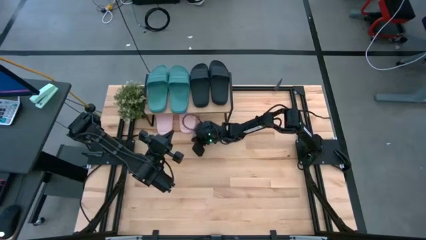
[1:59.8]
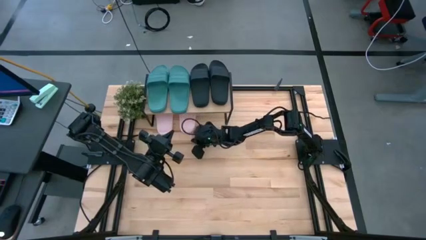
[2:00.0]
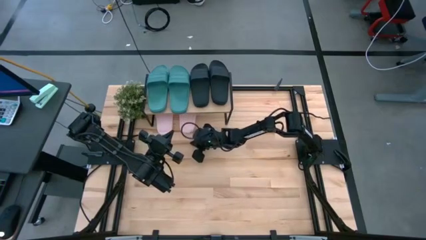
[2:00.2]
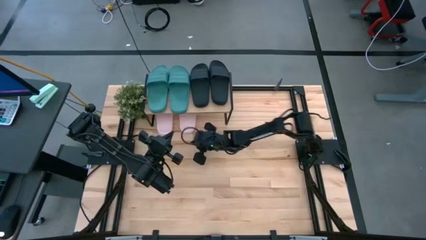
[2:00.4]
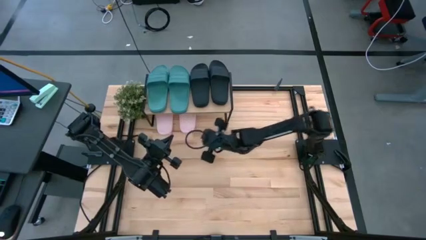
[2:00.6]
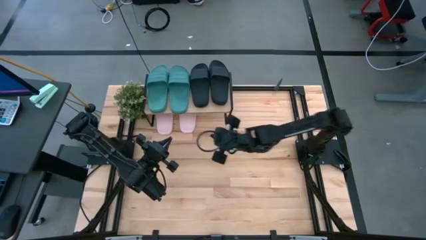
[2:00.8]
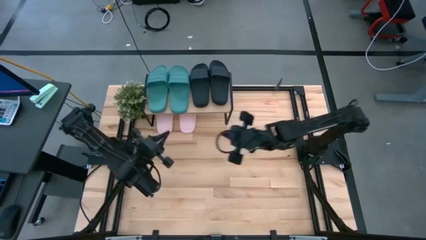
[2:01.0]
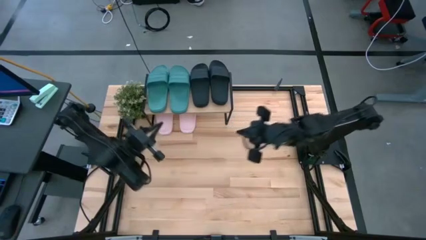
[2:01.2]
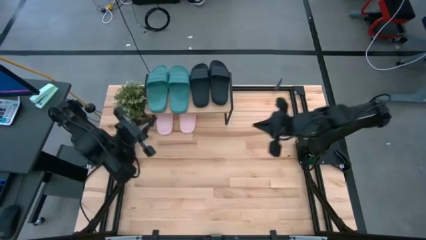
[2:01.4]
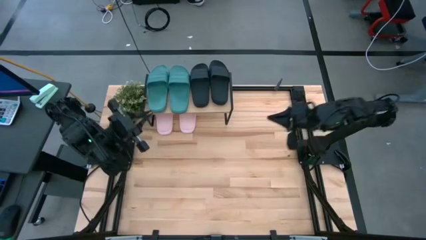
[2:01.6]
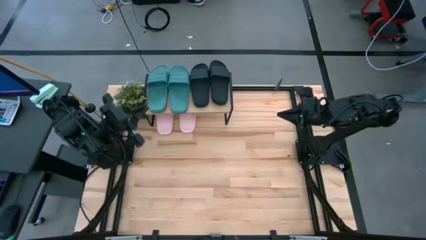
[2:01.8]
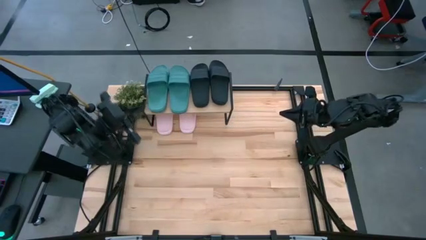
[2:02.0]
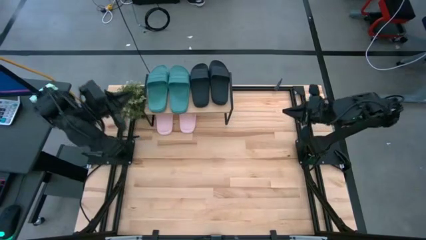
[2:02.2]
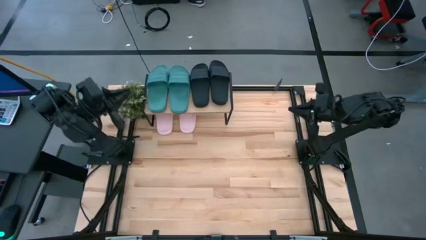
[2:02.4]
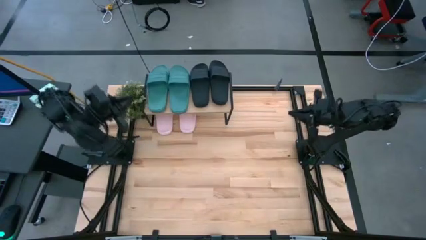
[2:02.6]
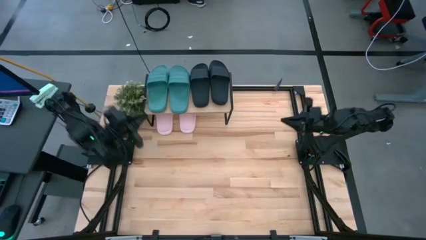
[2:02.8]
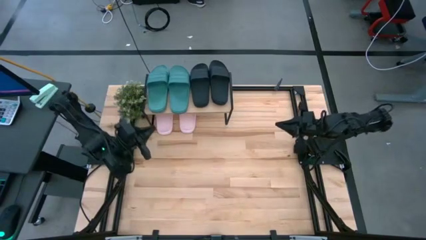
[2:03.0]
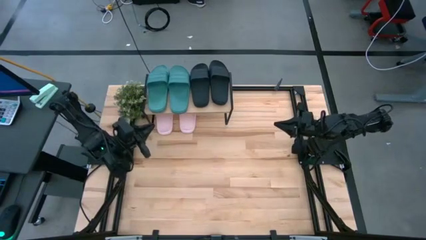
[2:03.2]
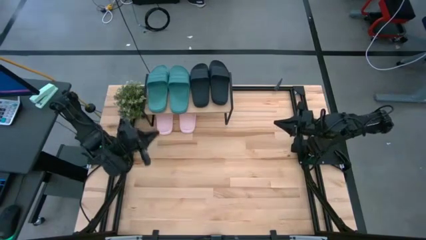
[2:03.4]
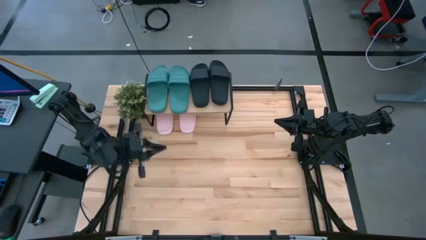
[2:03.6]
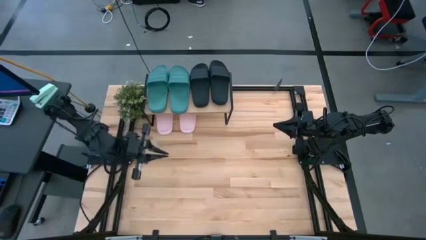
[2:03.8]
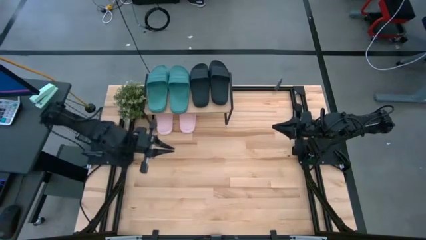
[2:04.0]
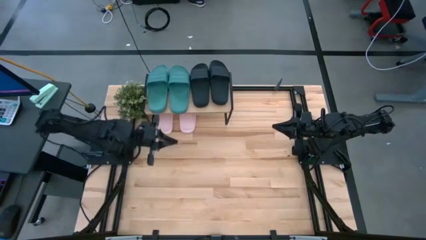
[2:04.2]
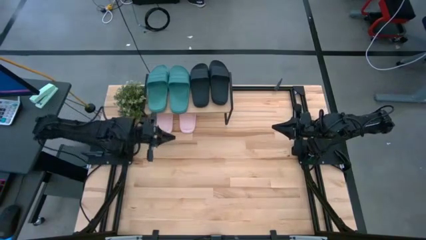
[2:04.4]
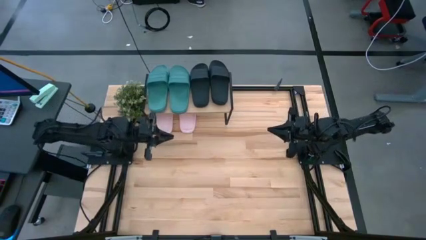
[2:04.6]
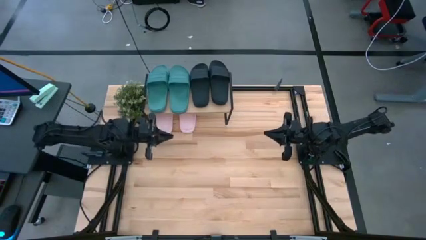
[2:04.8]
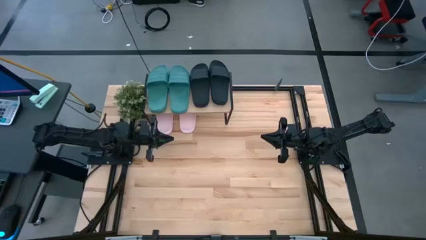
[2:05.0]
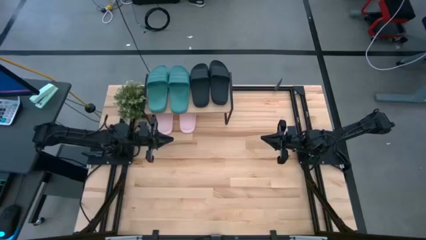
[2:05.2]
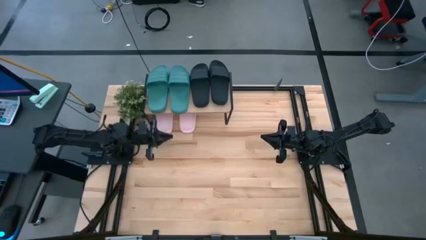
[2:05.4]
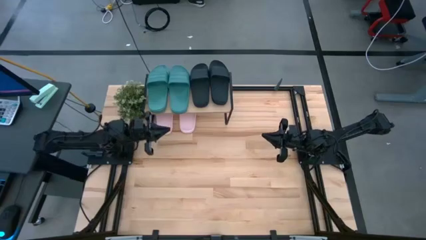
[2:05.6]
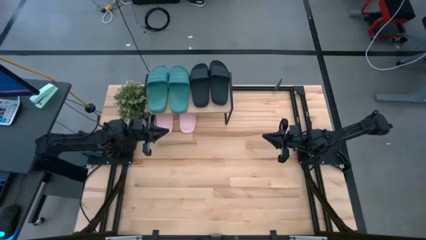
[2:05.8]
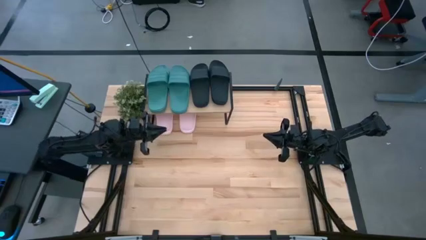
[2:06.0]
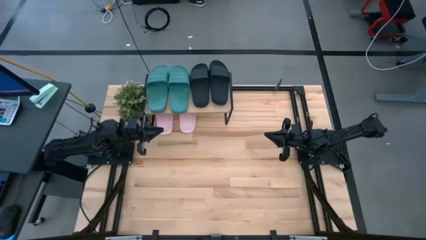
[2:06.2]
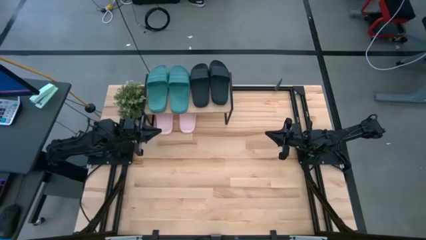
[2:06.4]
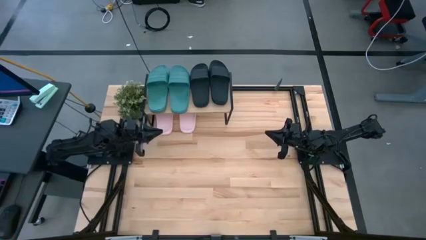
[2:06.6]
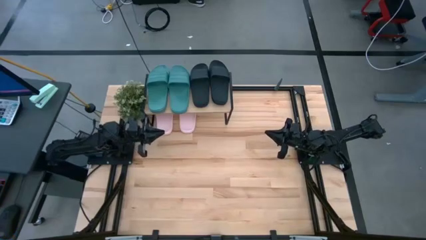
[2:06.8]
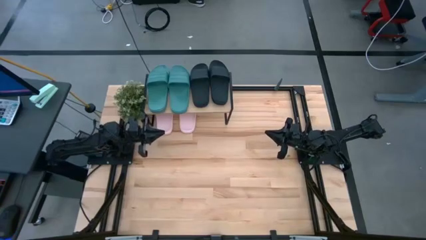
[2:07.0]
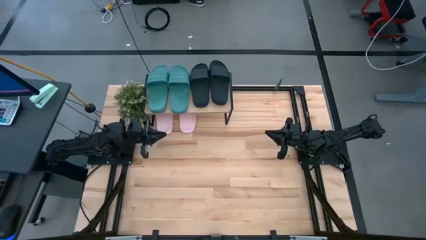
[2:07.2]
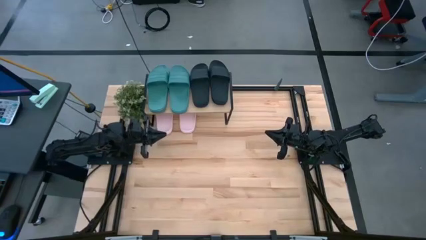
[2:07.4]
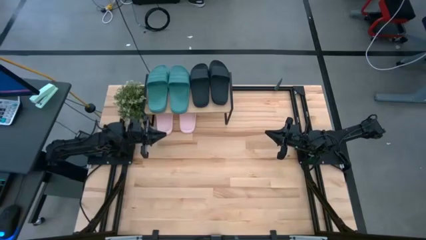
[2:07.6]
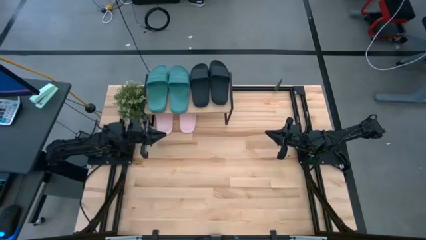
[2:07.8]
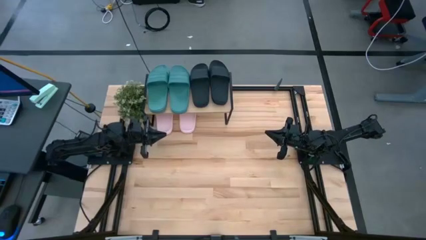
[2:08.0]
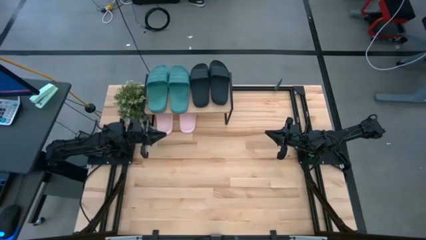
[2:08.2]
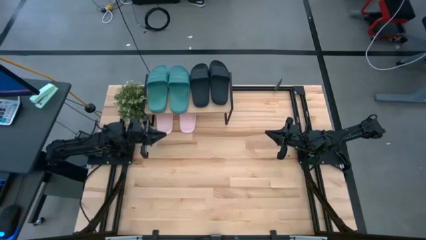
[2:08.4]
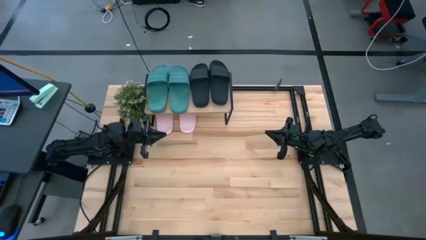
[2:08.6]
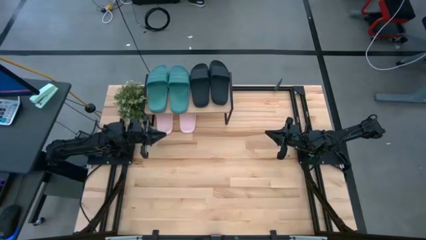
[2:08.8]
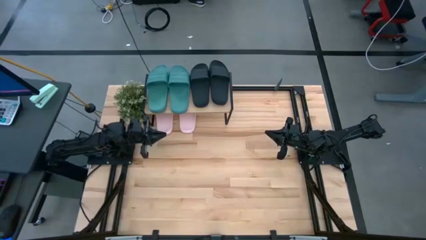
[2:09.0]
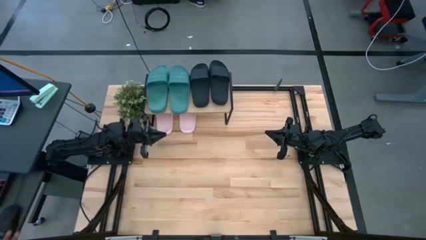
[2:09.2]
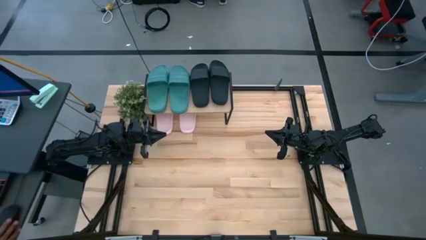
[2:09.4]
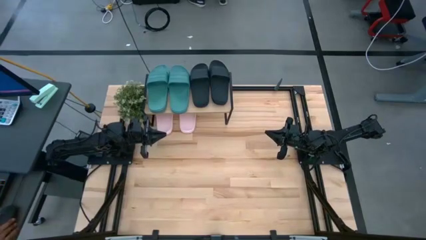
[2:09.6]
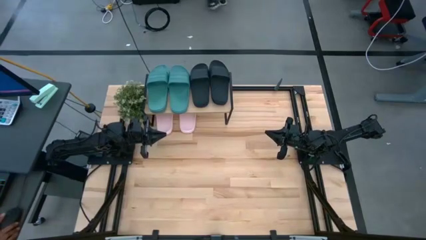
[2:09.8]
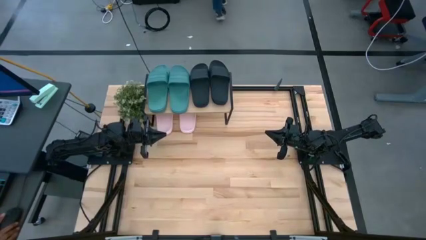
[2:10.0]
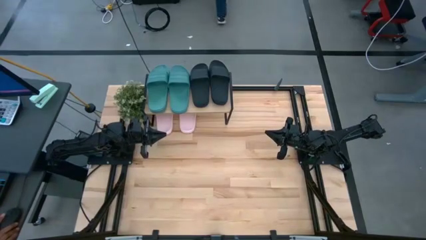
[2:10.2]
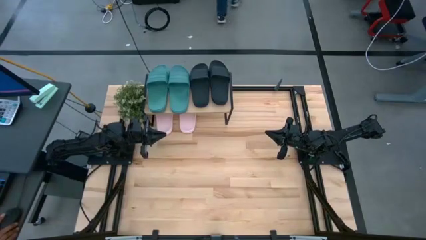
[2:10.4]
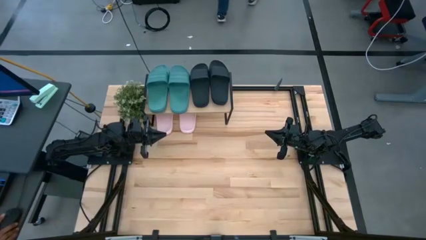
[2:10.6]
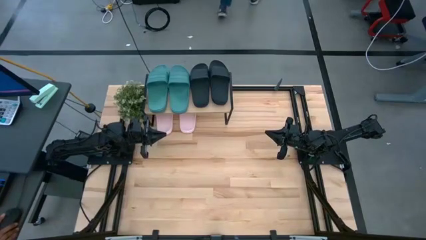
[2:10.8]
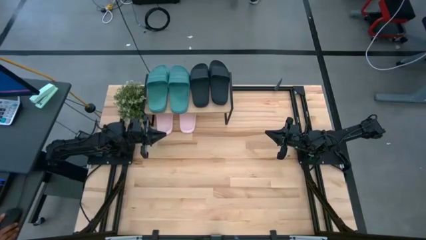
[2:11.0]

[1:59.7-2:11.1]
Task: Pick and place slides into the shelf
Return to Home Position

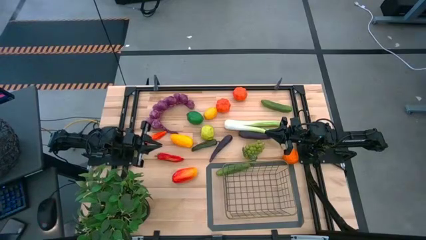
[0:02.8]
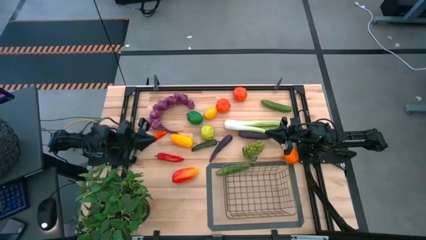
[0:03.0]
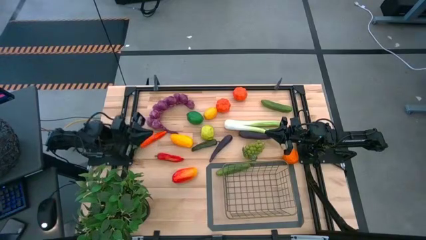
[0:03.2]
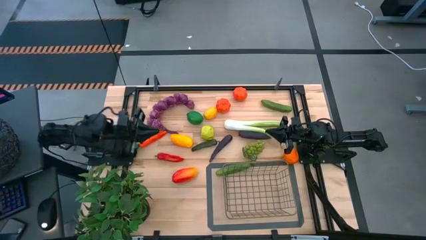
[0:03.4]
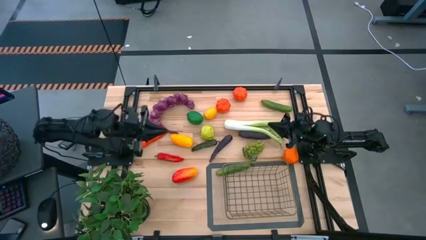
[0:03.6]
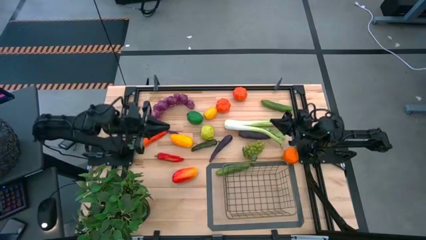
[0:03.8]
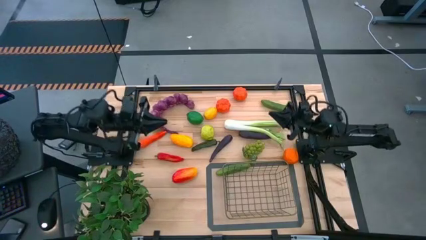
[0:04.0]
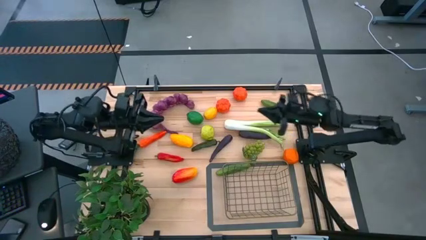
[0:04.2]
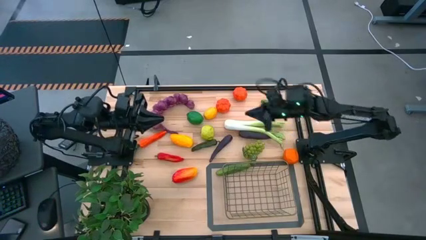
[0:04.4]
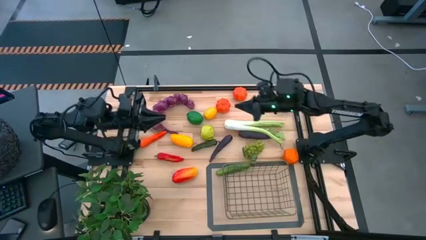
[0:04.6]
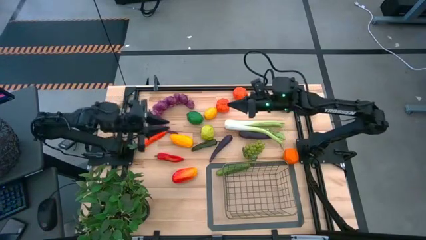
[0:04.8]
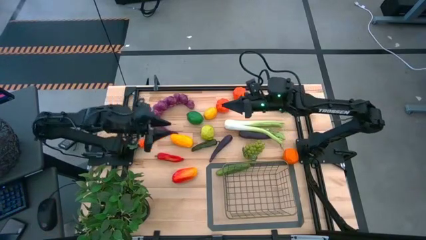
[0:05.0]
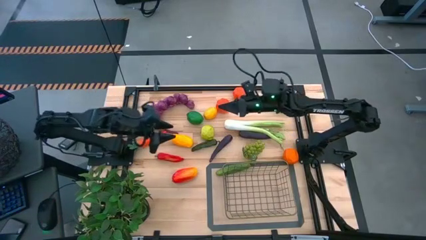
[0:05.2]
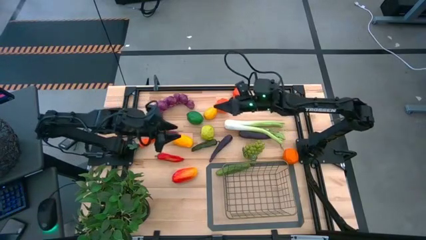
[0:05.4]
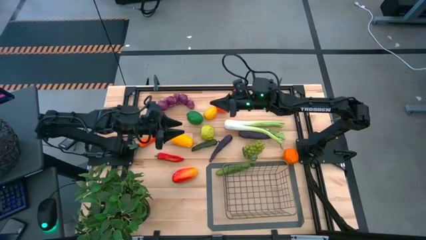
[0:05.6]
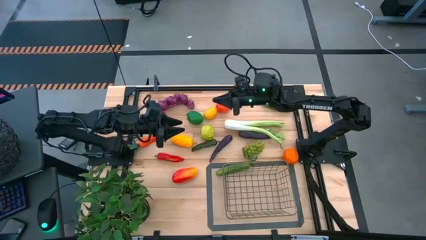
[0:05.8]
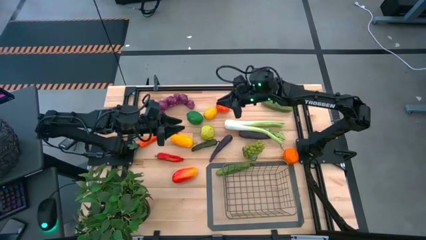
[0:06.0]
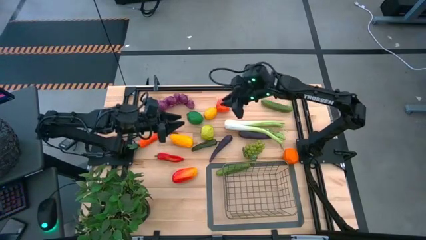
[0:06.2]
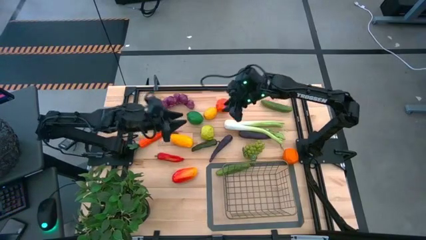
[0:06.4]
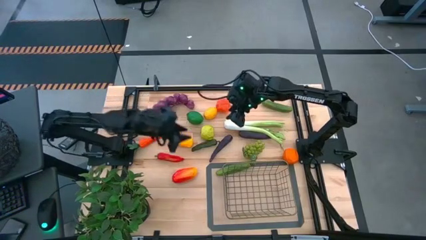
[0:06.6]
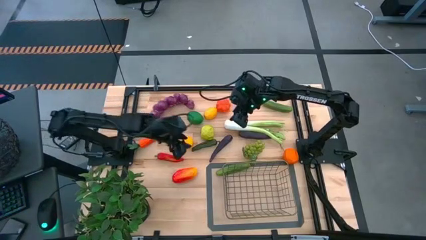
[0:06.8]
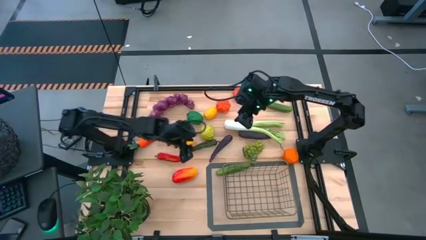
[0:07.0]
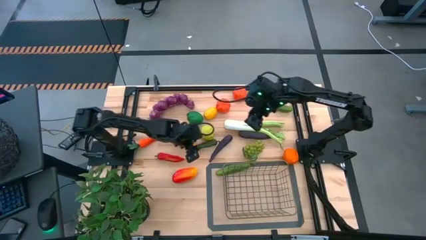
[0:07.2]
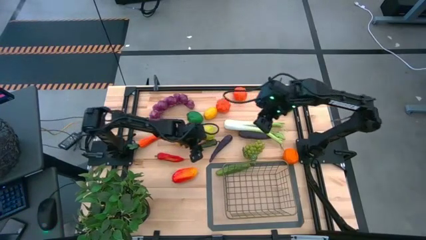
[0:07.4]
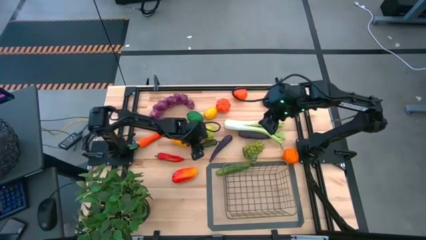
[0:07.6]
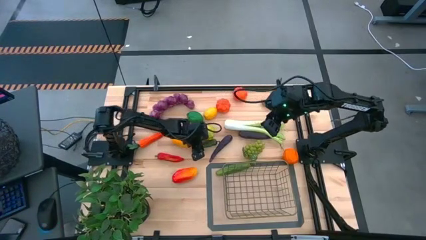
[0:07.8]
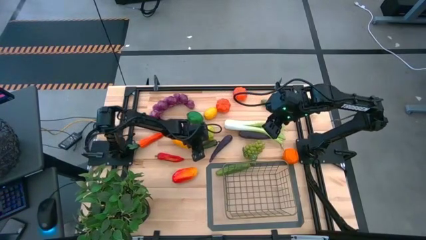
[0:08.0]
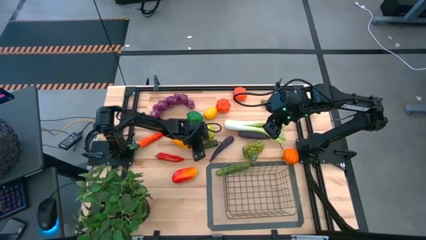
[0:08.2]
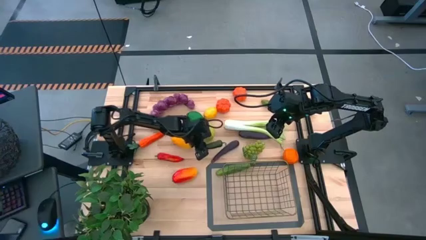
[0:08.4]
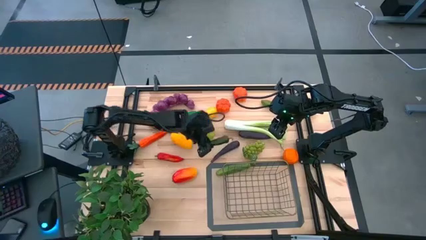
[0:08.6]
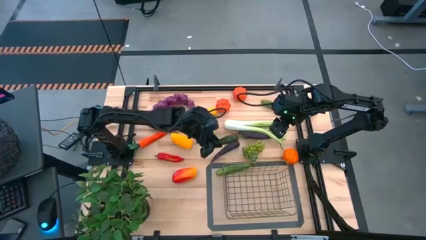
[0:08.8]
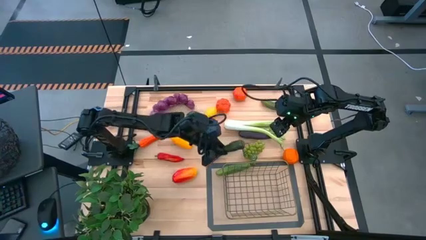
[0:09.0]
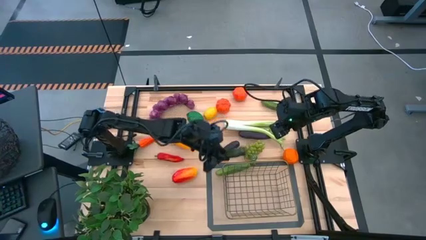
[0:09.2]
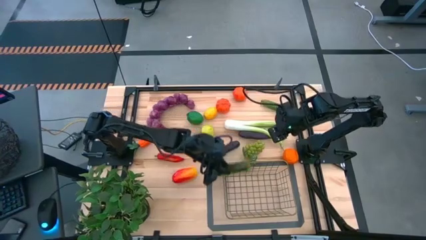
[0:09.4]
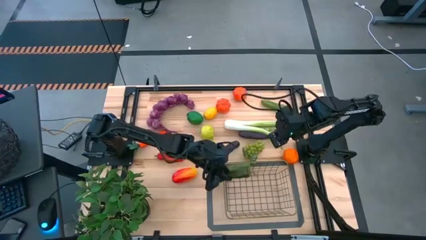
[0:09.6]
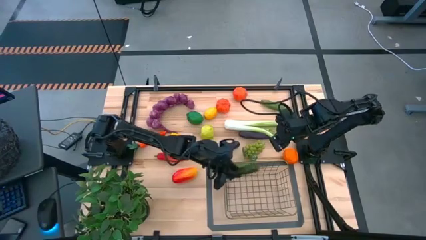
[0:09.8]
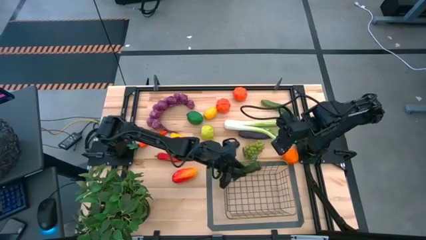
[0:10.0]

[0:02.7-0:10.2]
Task: Build produce basket
Put the green chili pepper into the wire basket
